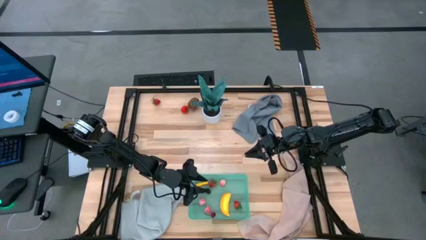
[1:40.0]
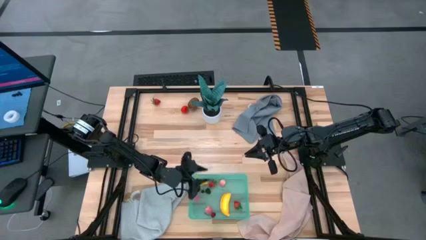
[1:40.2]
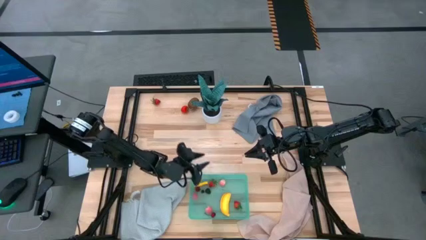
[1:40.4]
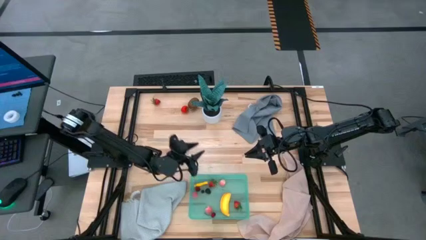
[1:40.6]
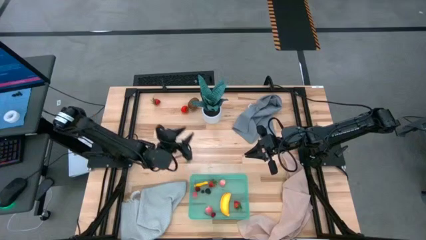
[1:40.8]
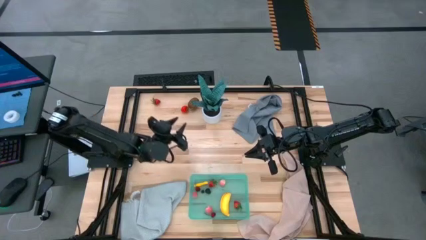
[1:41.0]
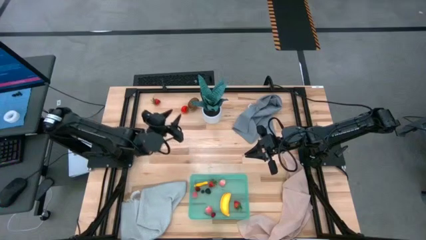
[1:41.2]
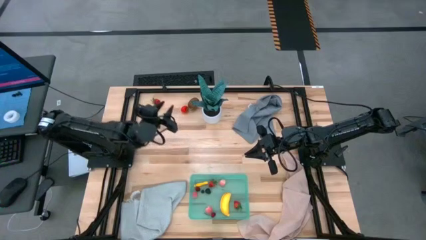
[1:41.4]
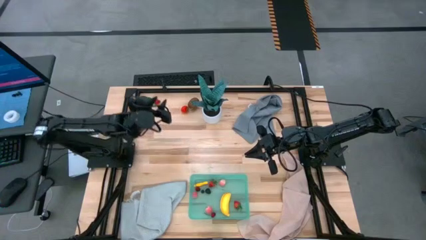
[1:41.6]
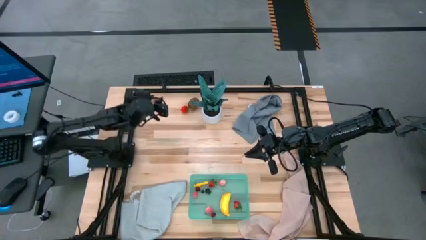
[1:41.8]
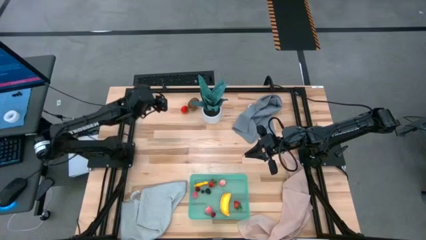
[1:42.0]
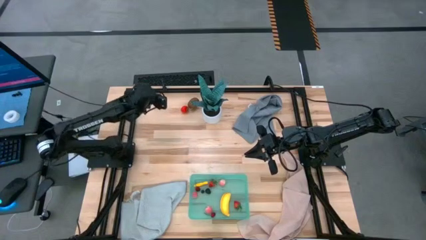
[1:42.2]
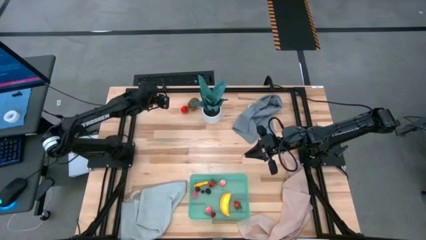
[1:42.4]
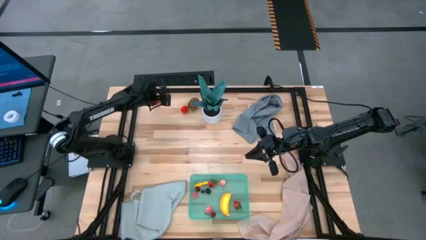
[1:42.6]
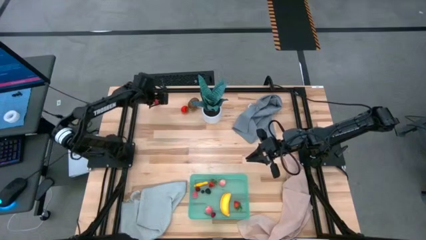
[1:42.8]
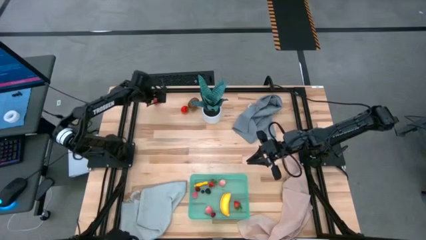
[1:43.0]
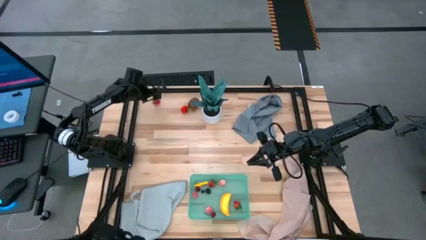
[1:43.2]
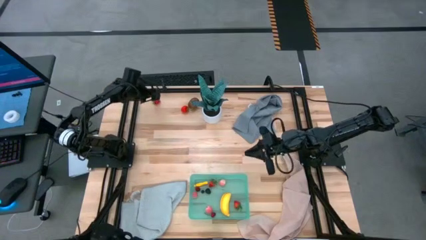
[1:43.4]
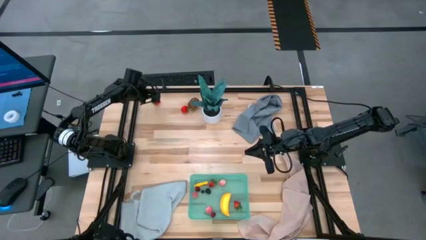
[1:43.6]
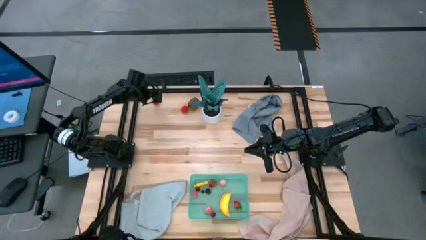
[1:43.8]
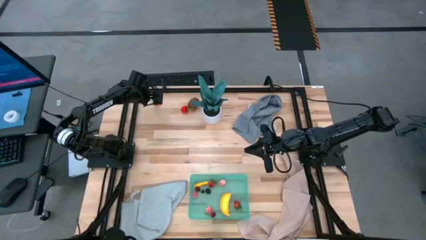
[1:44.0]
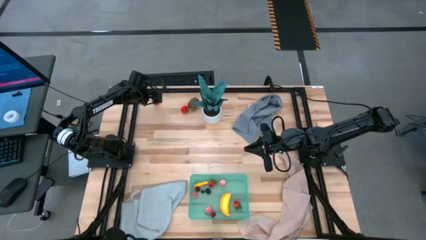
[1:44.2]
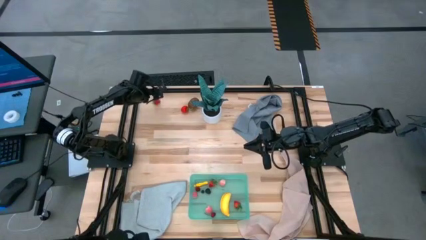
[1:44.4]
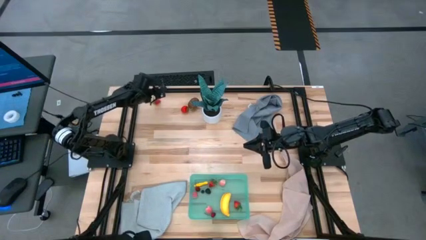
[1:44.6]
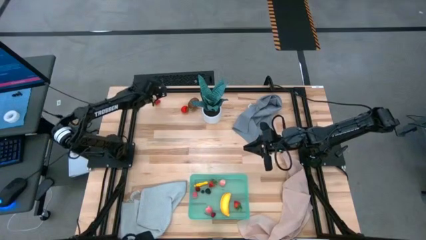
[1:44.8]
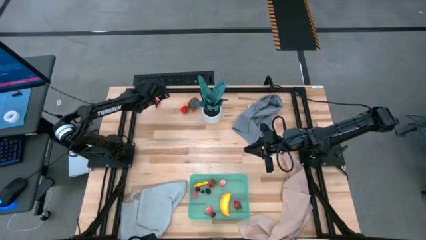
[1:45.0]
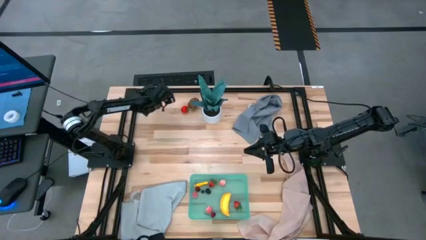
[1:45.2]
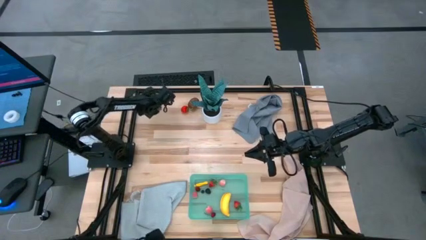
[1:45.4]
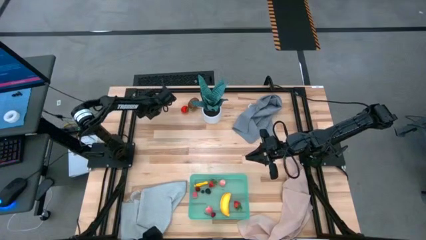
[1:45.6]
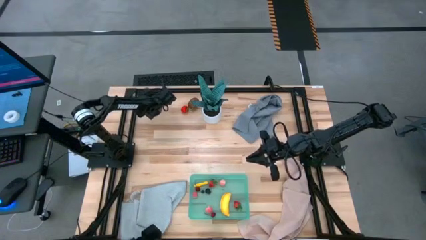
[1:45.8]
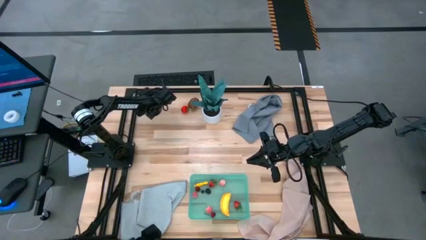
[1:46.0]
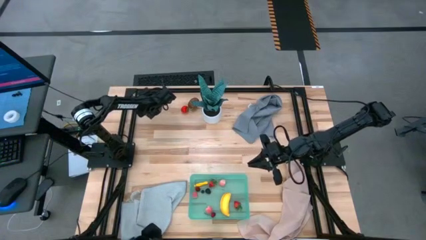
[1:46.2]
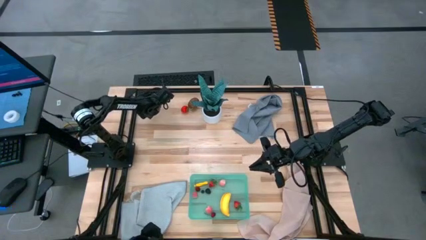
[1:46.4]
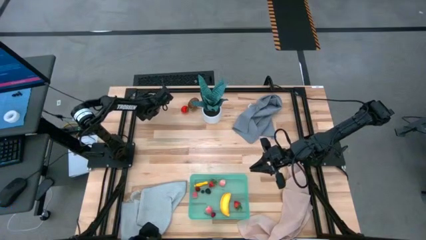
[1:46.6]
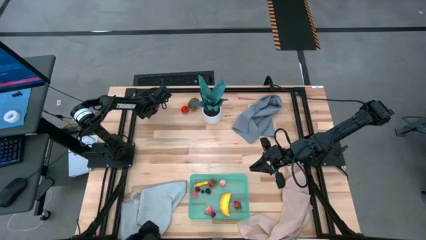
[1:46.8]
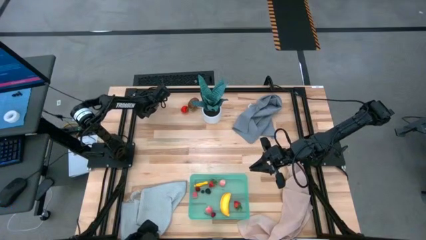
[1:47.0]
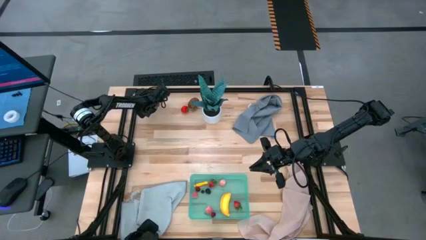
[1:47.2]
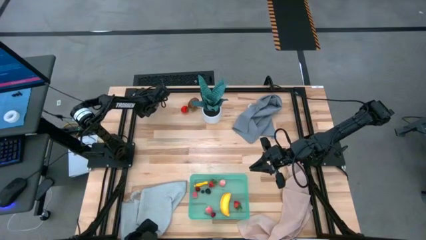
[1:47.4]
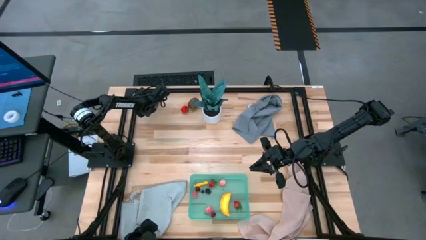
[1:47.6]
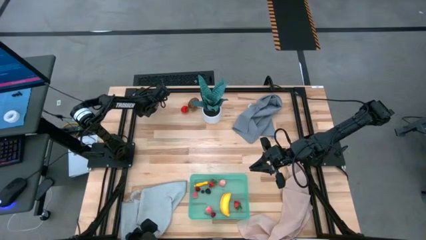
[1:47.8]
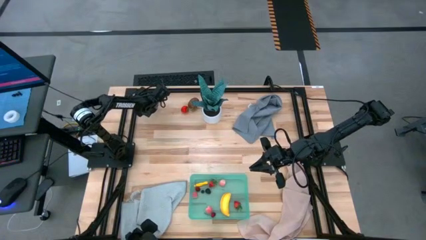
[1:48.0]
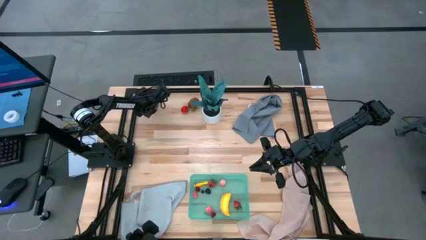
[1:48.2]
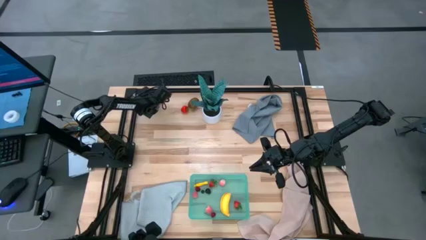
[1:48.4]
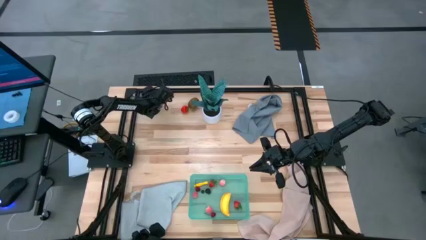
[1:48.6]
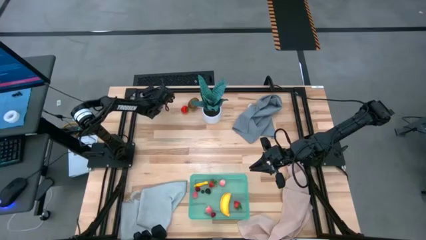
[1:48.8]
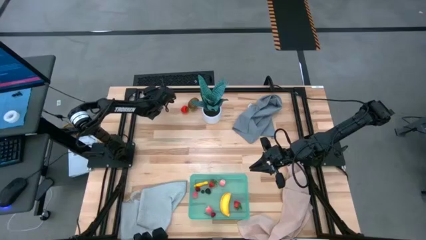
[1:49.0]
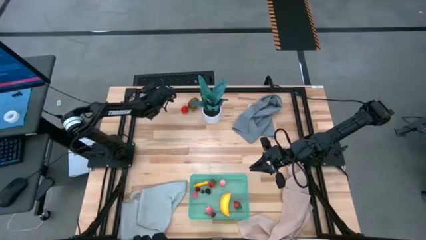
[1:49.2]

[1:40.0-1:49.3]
Task: Pick and placing Produce into tupperware
Put the red strawberry into the green bin

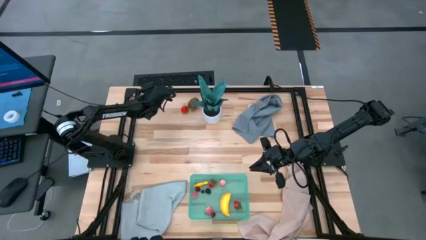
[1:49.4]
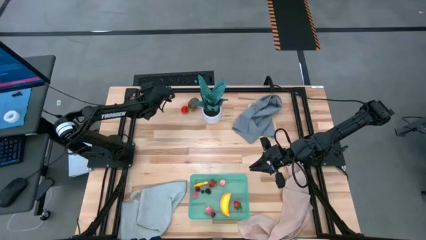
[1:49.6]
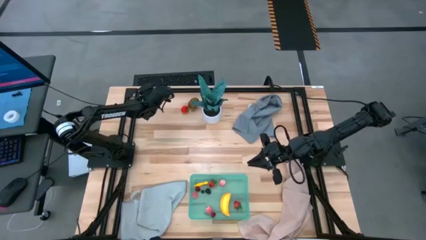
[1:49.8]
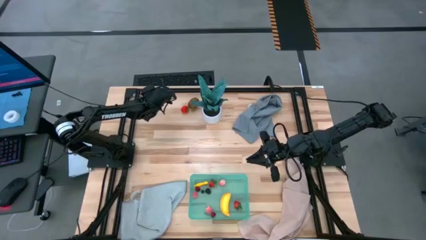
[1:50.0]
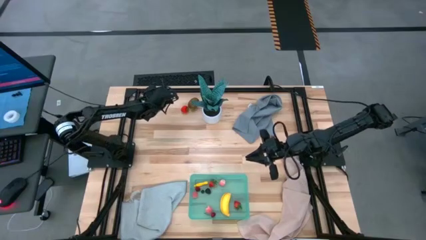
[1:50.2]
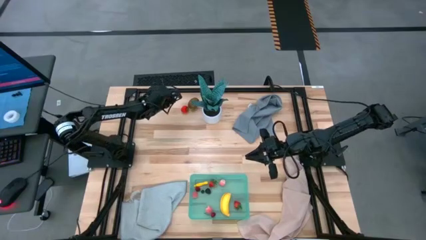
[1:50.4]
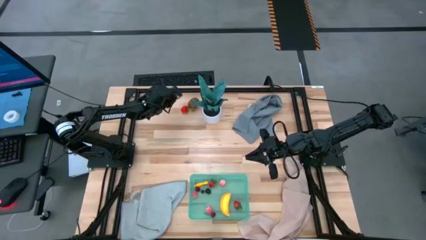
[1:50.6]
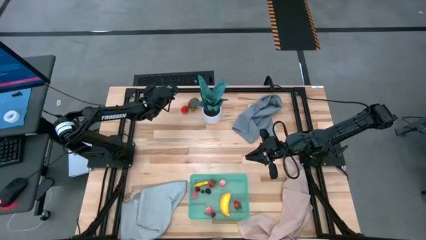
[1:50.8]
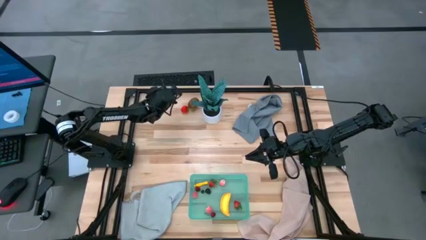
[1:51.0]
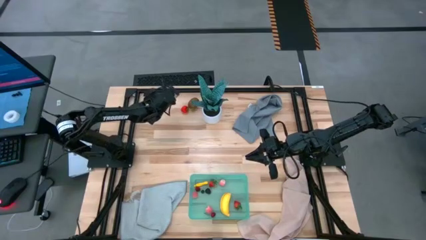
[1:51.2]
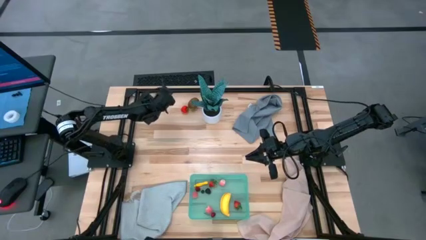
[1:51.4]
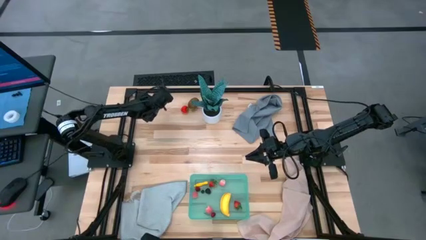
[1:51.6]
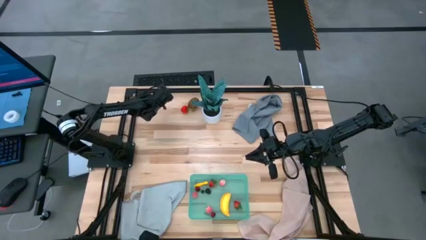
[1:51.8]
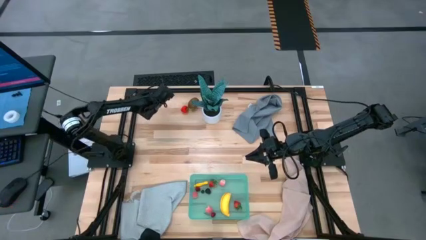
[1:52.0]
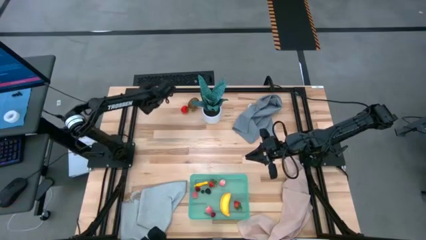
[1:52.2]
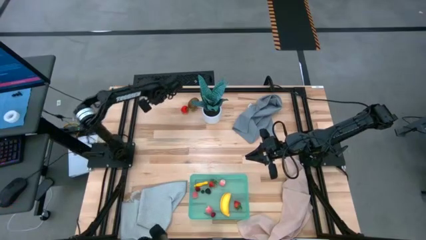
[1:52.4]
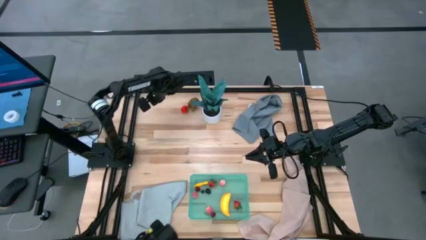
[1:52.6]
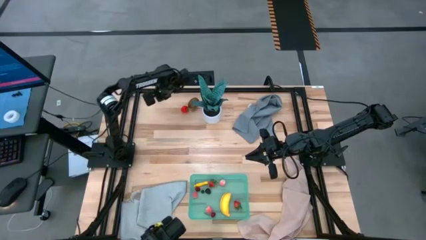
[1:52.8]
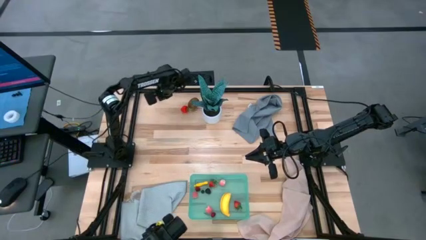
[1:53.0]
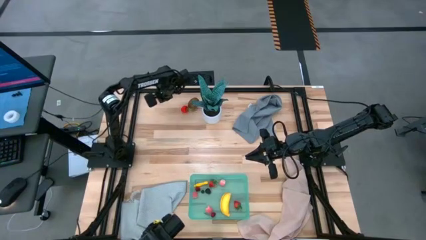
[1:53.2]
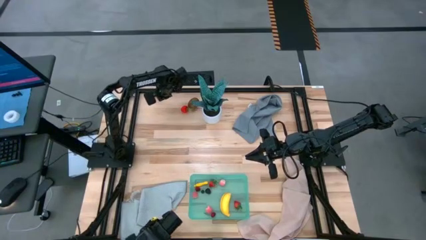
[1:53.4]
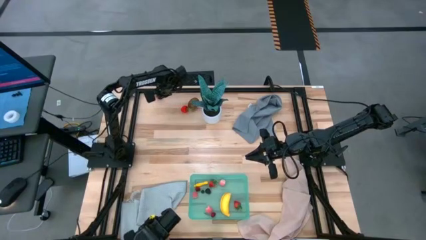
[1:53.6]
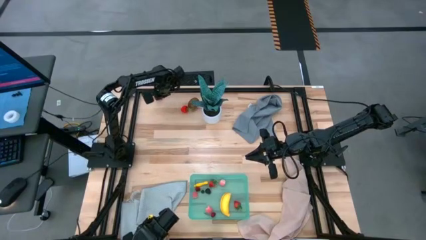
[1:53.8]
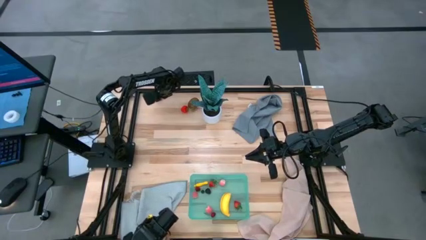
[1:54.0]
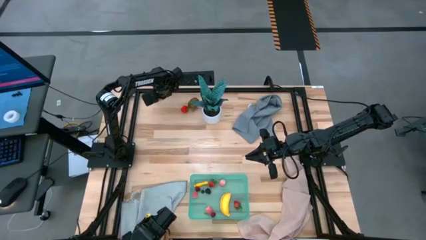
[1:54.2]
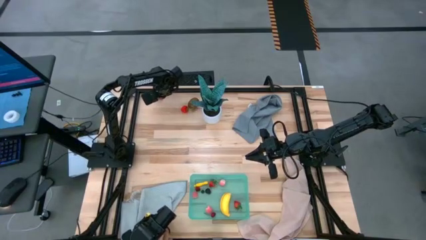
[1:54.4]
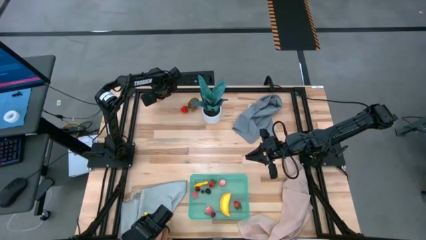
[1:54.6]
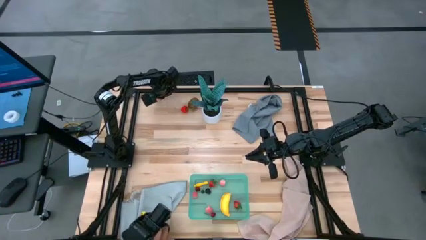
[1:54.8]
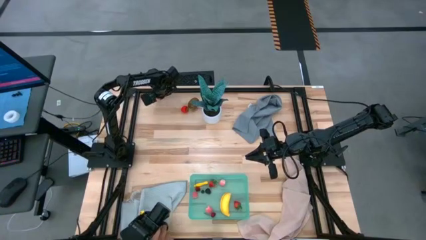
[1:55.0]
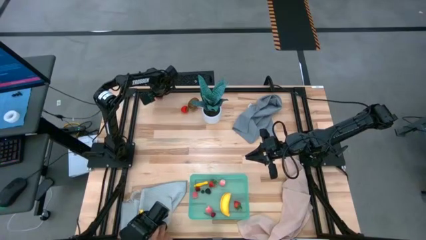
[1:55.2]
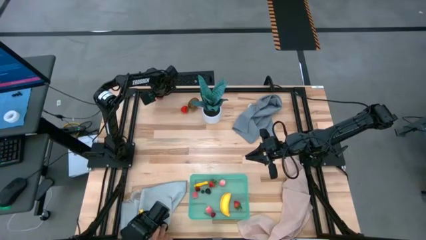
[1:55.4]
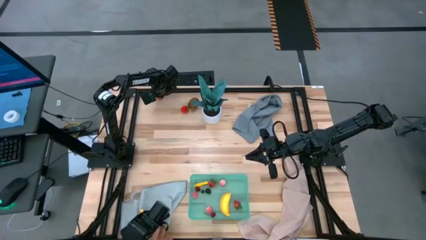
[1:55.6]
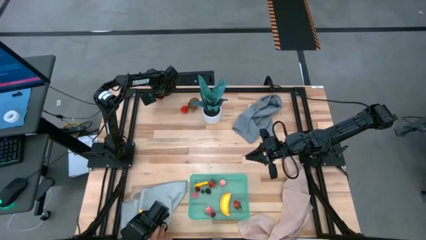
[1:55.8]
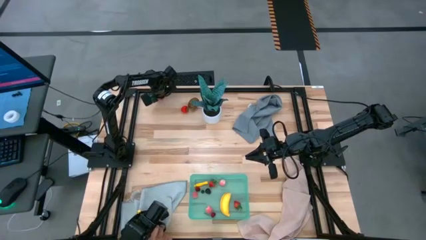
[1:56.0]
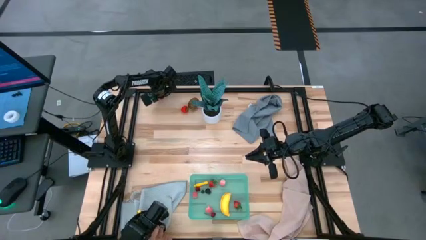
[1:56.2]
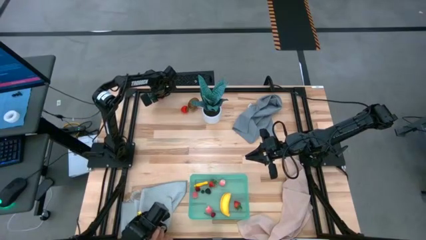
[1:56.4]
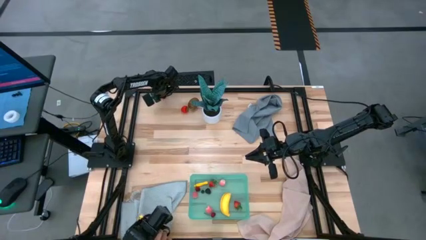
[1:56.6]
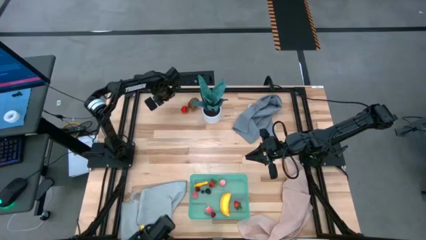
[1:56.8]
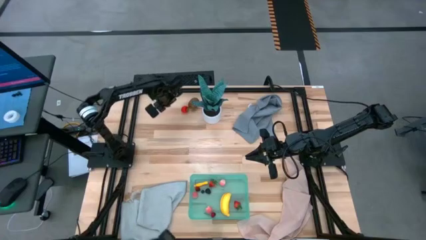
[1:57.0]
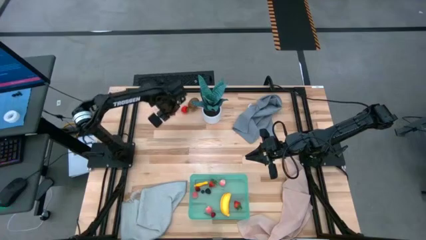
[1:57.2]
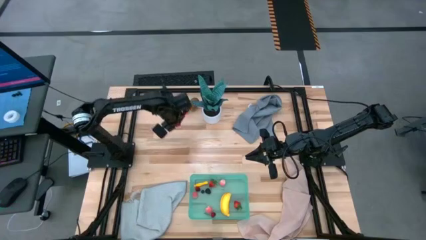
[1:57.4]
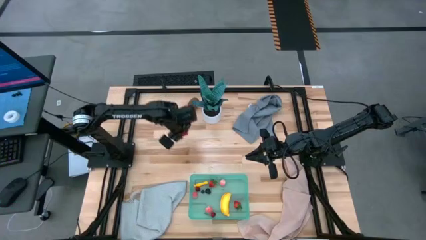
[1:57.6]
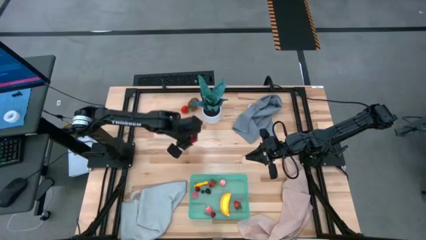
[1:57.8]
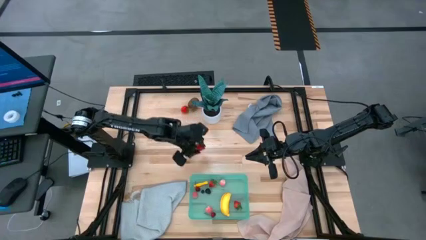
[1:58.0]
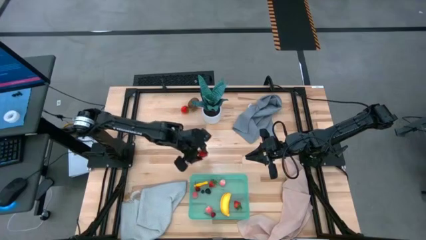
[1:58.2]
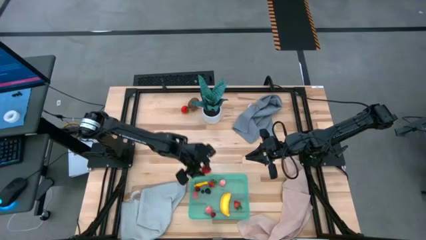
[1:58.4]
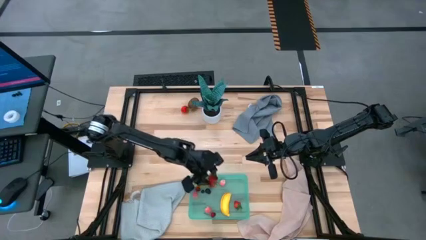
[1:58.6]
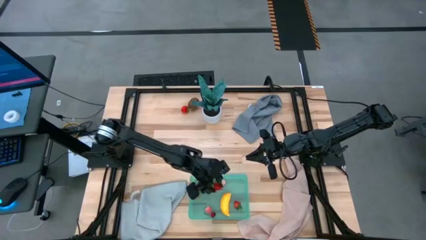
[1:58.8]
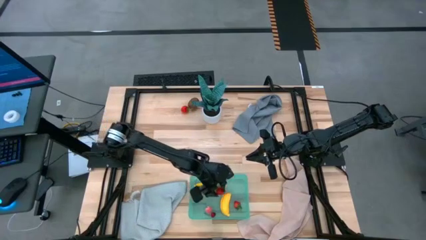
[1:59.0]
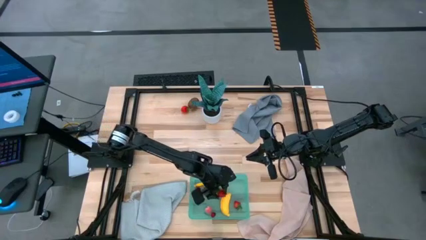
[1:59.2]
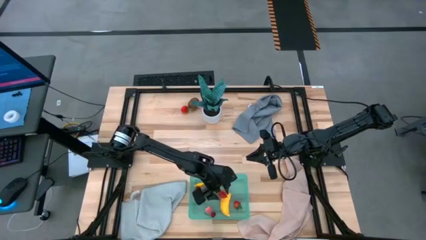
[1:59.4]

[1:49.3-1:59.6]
Put the red strawberry into the green bin
